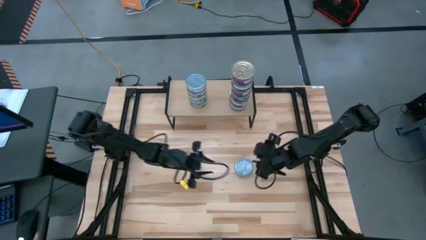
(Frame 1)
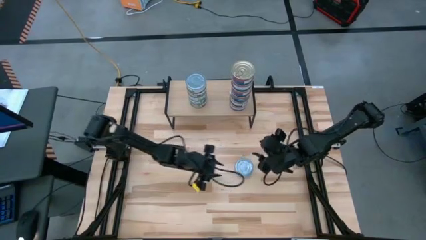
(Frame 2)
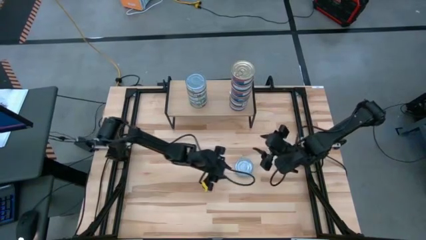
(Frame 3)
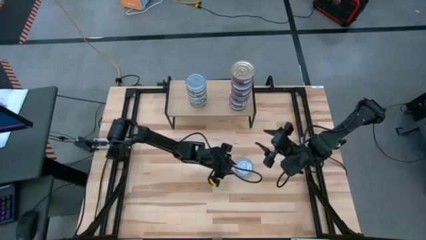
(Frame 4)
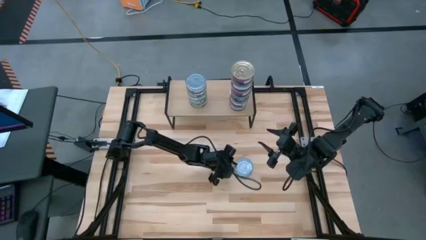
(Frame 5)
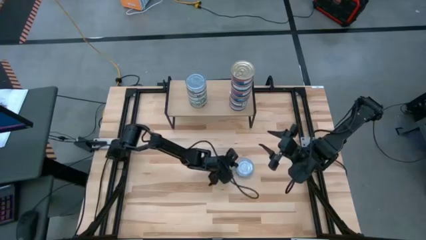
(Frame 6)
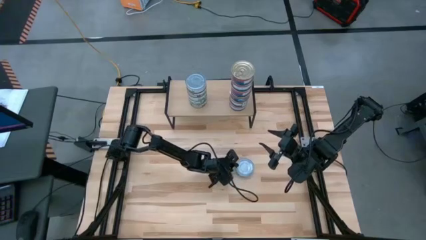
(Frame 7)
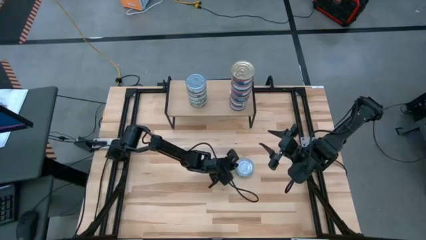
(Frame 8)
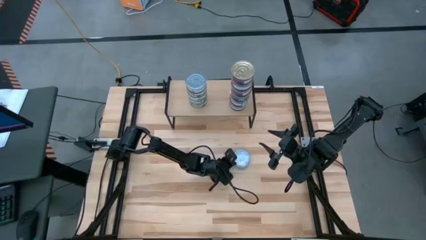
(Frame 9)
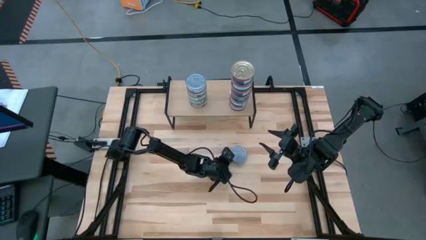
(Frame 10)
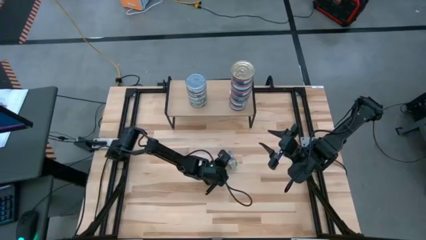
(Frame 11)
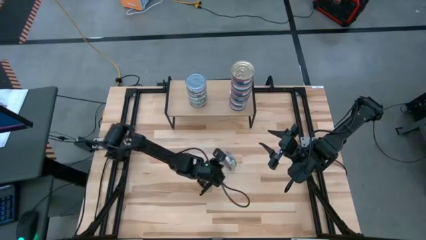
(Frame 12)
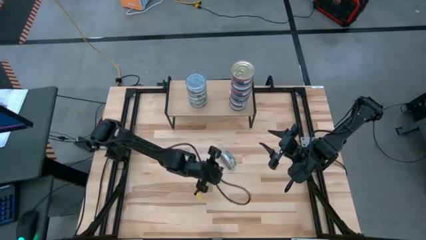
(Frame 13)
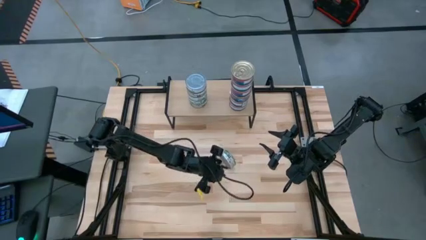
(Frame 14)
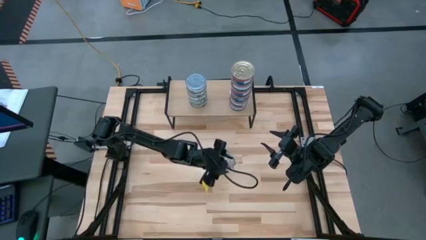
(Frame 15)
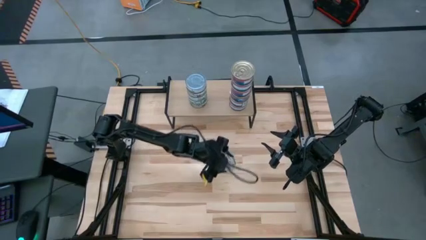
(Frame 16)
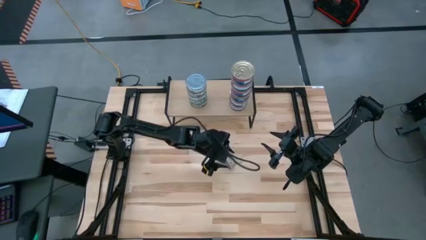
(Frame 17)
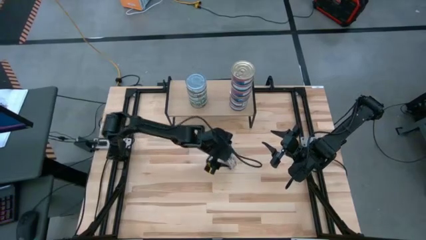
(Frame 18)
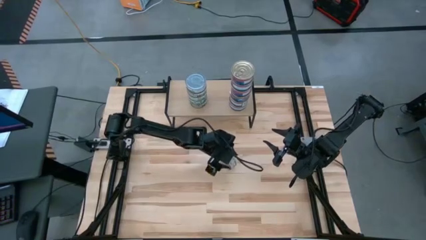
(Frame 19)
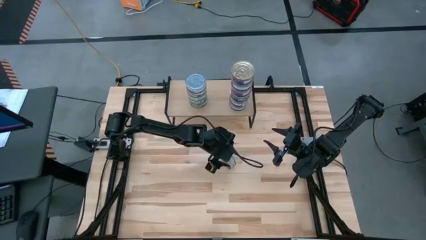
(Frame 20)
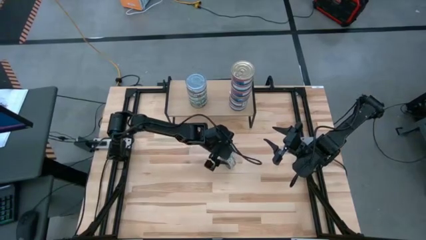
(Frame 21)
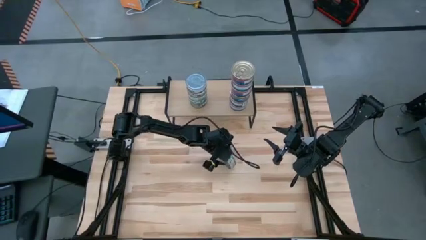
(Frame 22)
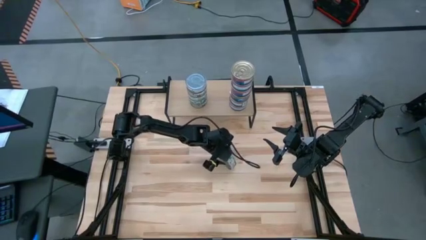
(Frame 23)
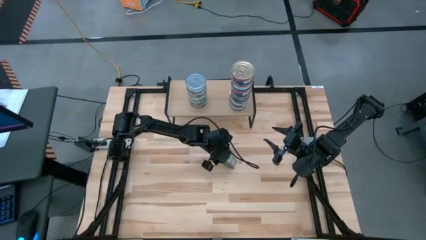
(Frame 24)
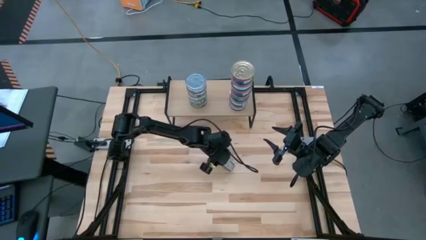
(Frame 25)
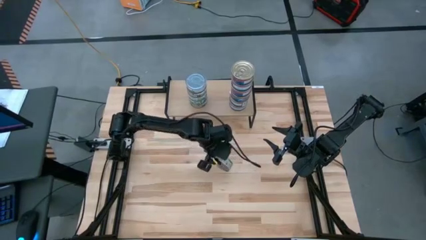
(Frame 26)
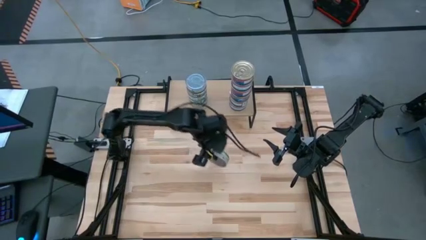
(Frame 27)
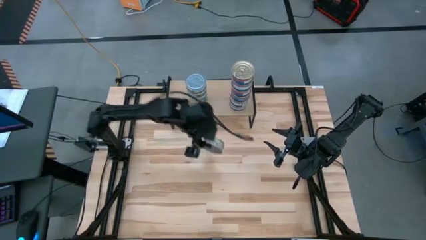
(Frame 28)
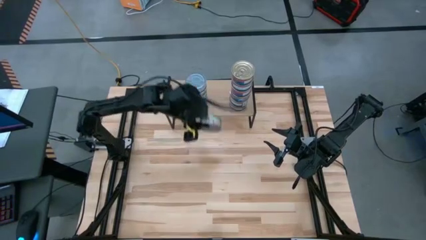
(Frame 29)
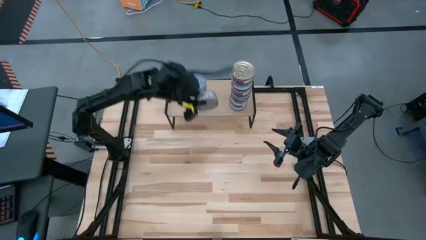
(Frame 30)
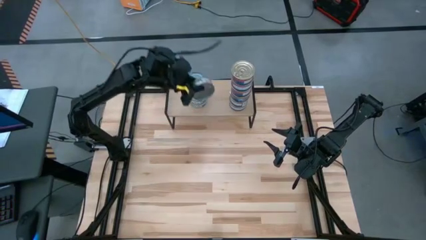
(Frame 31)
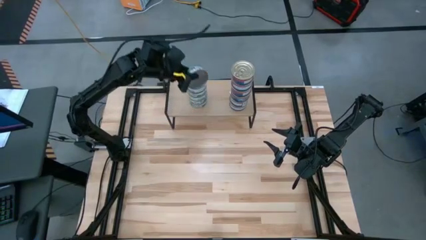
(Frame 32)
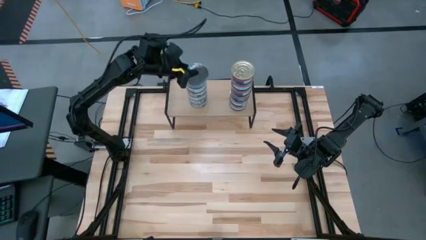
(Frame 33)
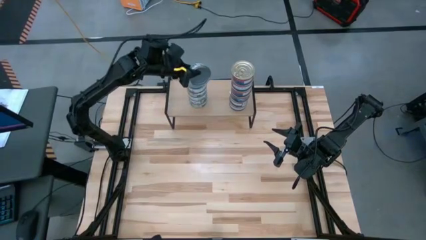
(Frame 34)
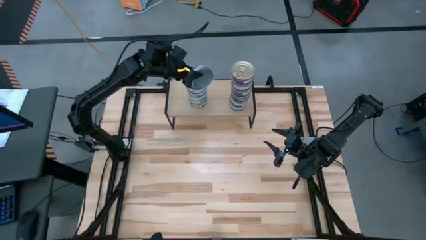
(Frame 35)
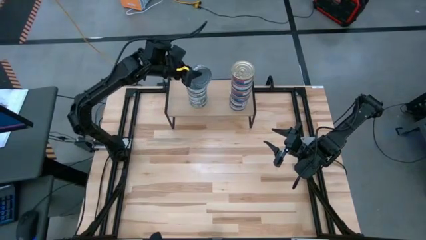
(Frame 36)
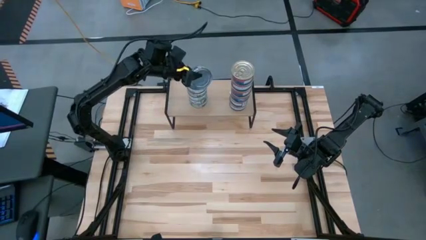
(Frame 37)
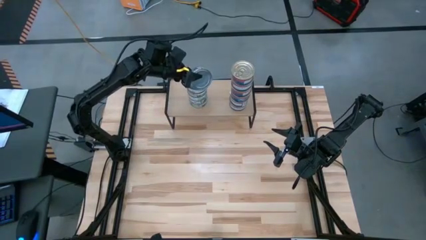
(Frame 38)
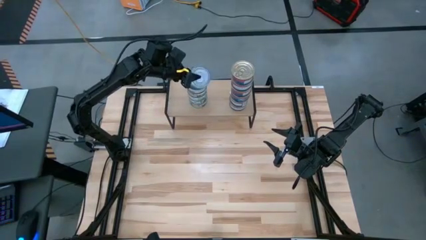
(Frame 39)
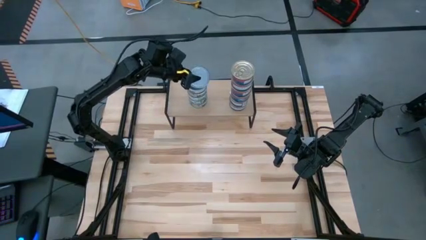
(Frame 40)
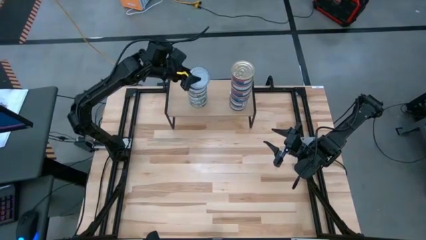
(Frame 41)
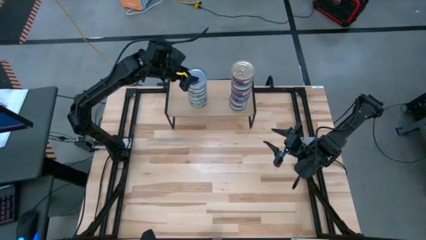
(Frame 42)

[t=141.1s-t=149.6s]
Task: Stack canned seafood by type on shelf
Stack the green tuna can on top of the green tuna can on the shelf

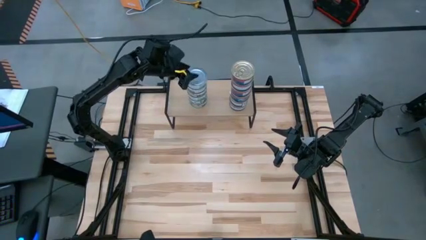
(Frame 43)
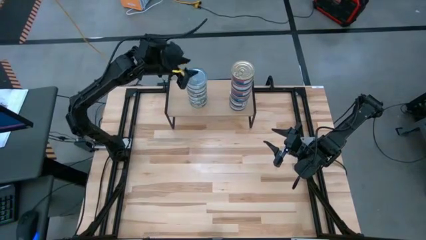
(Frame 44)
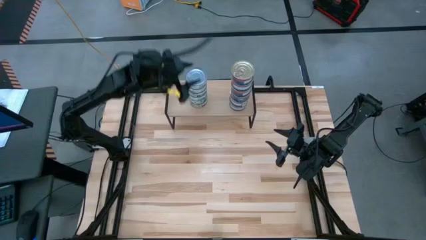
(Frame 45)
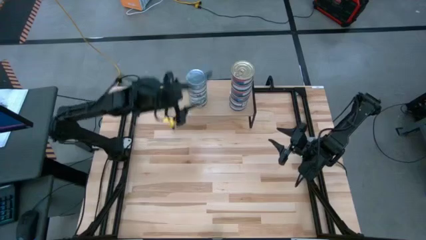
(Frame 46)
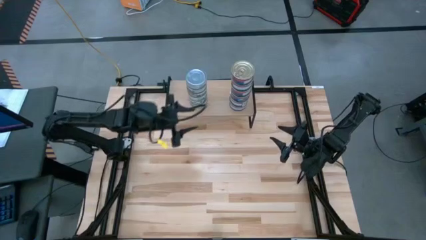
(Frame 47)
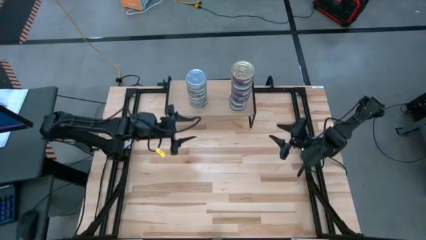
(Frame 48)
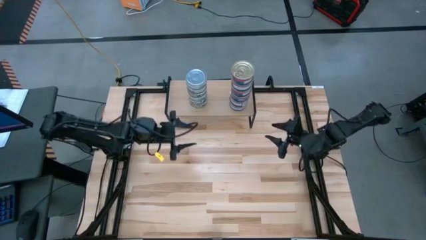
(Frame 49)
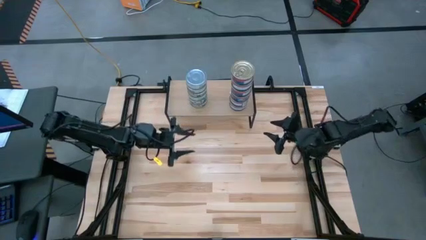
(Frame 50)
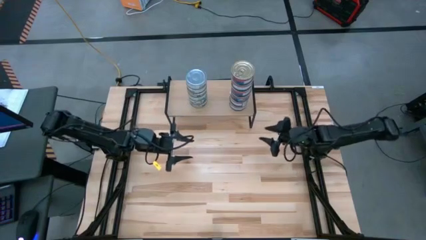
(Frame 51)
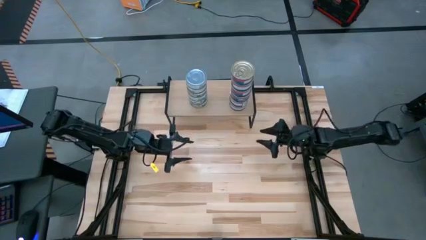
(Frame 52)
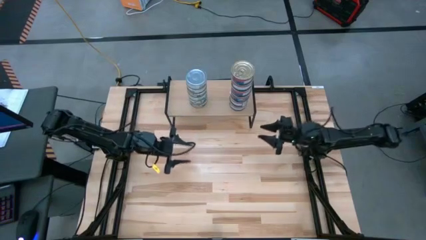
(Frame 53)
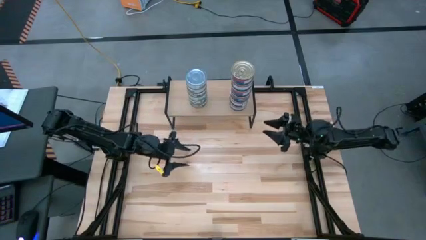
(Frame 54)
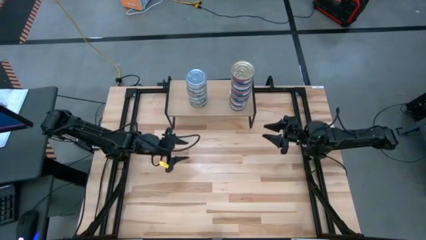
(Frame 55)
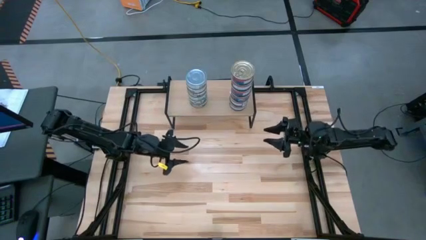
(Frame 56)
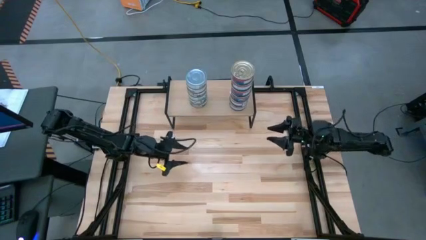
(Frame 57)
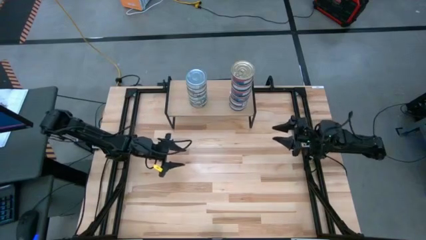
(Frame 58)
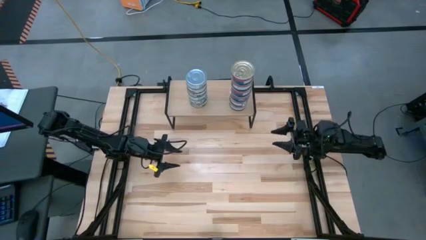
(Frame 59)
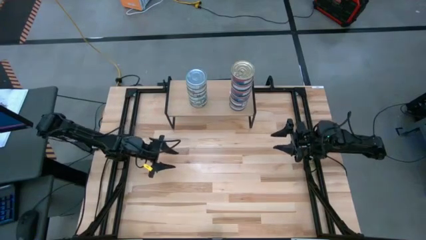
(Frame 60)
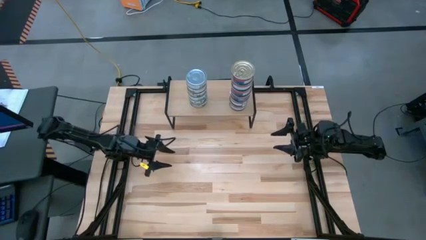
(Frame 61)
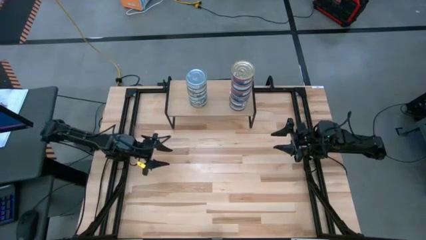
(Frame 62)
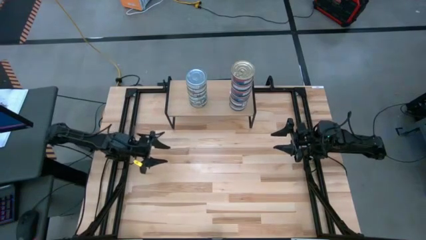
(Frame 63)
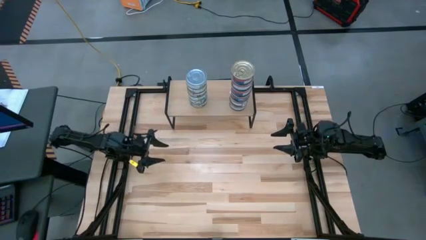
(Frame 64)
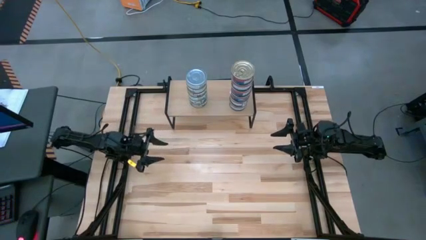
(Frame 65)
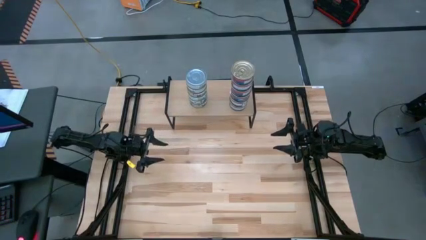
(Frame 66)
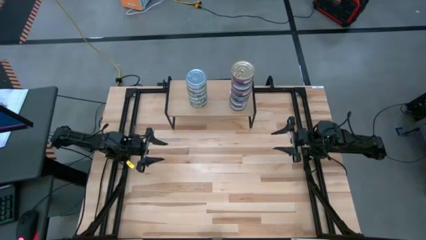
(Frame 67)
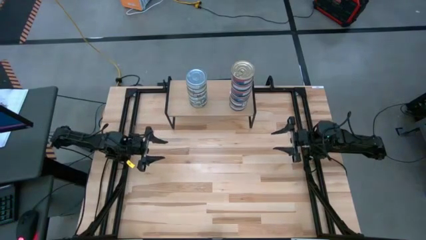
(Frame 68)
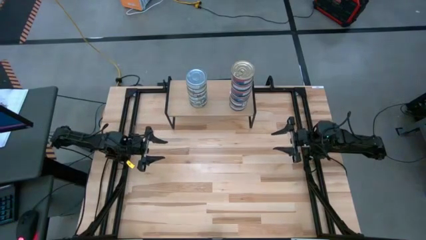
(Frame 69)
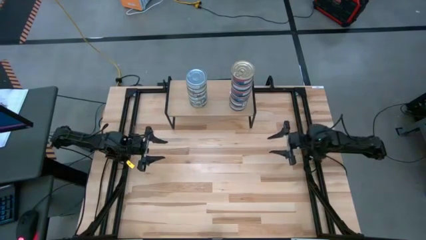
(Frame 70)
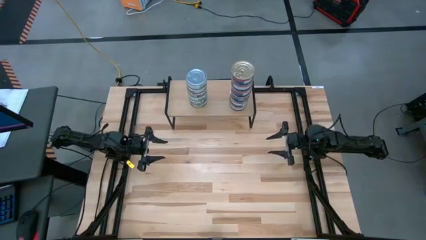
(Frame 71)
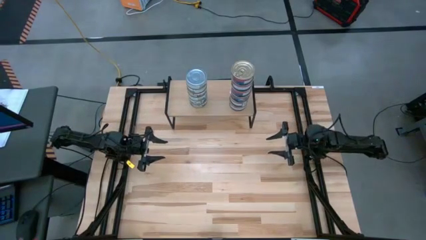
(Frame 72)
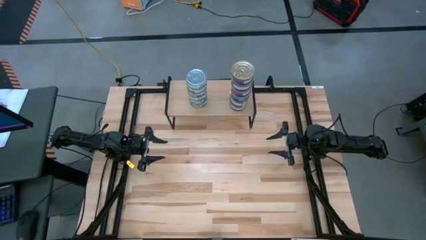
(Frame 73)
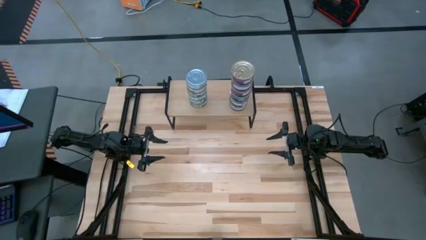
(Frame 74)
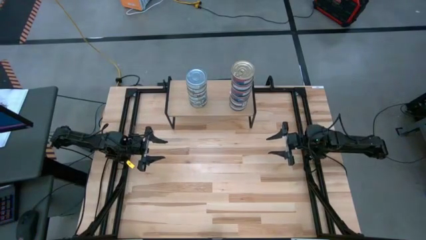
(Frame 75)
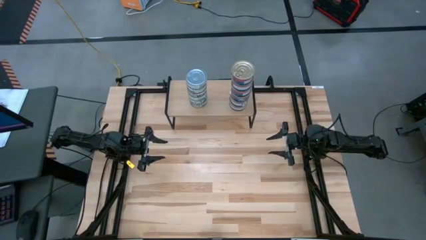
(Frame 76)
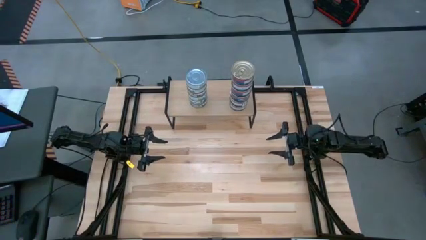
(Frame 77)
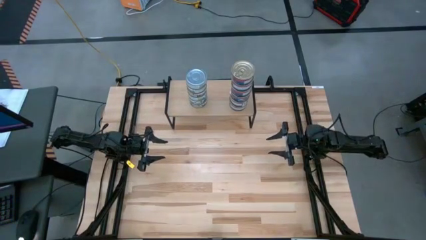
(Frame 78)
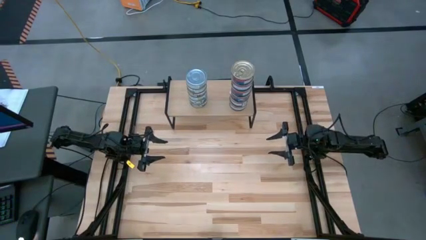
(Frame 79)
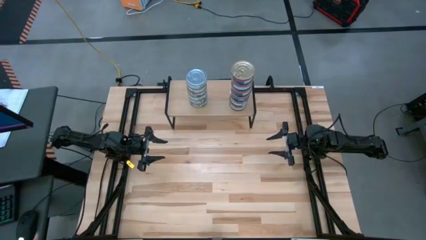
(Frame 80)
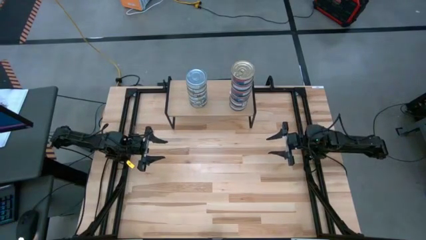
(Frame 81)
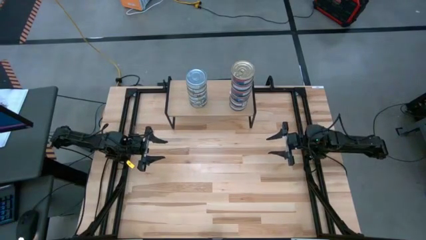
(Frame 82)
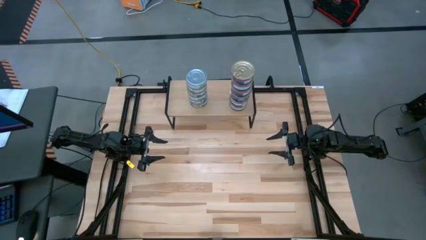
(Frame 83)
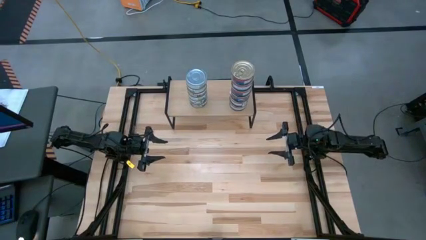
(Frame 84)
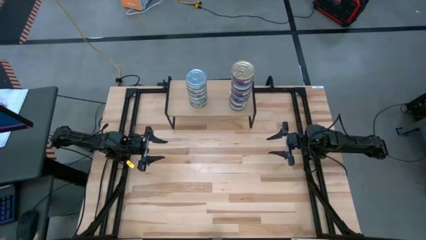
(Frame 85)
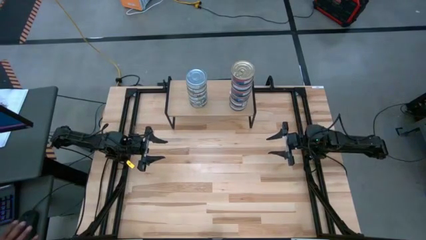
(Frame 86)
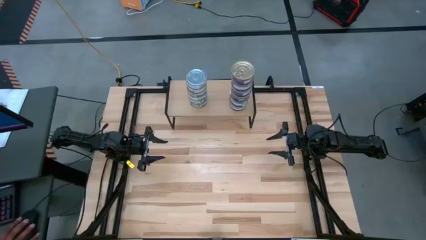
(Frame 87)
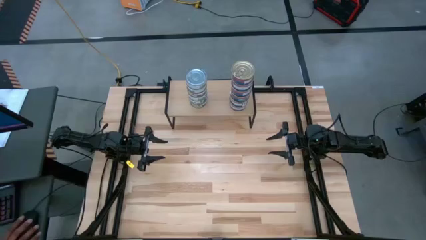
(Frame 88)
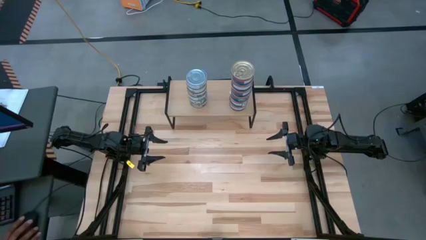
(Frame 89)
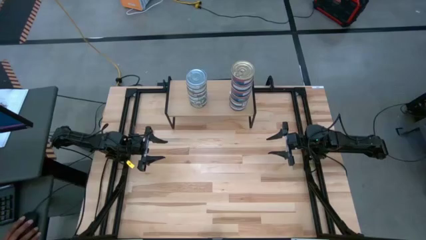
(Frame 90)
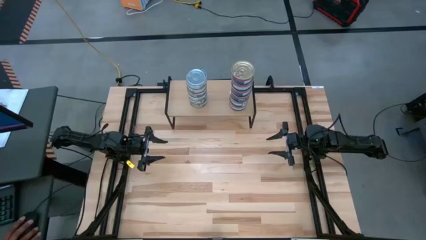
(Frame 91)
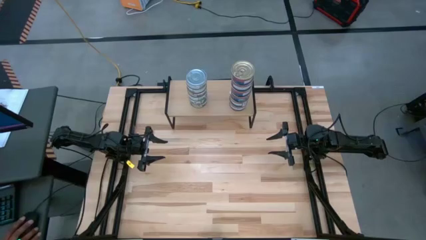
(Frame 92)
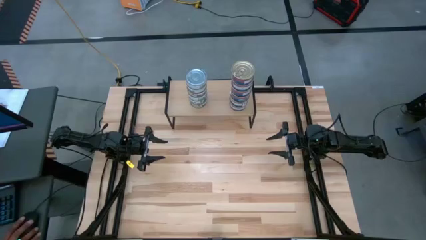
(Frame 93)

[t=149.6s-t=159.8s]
Return to Home Position
